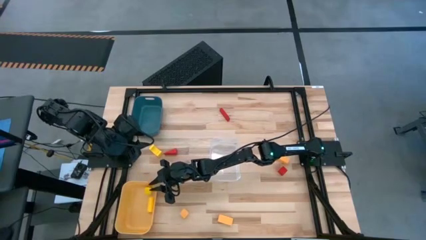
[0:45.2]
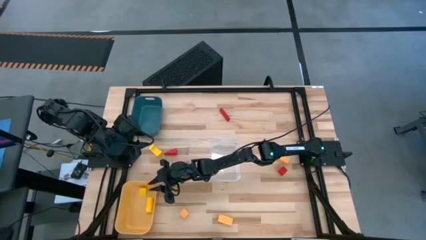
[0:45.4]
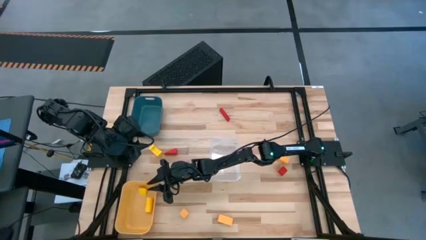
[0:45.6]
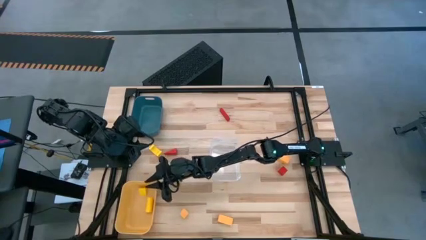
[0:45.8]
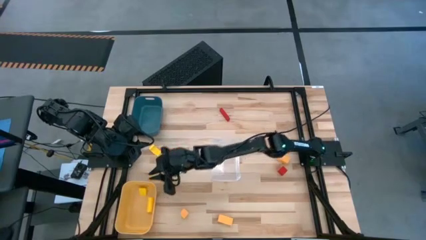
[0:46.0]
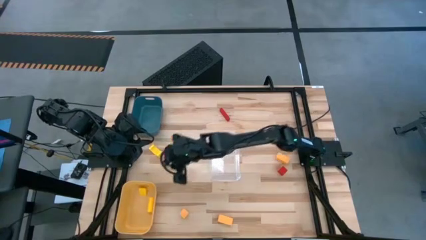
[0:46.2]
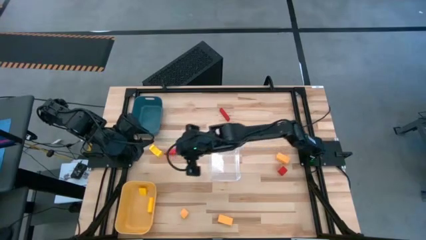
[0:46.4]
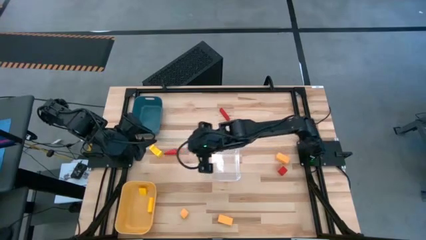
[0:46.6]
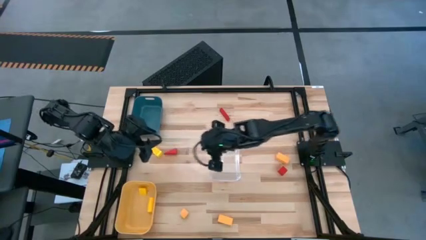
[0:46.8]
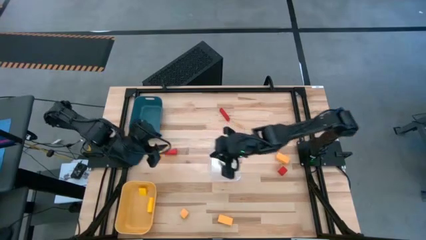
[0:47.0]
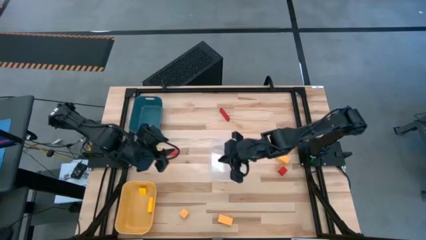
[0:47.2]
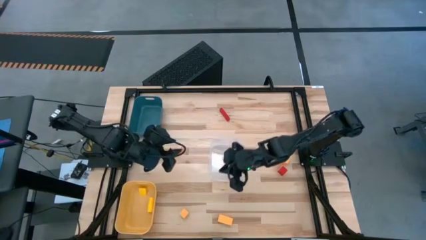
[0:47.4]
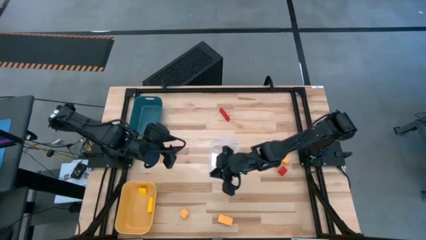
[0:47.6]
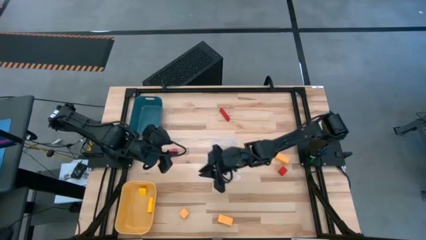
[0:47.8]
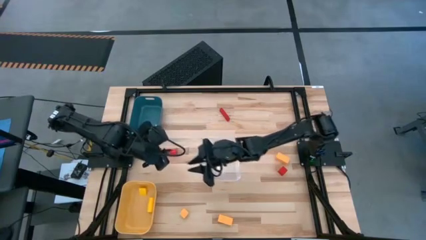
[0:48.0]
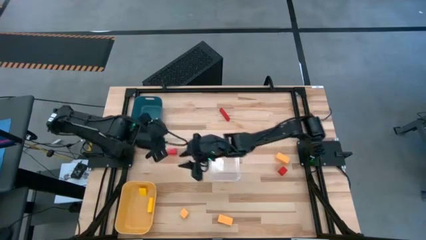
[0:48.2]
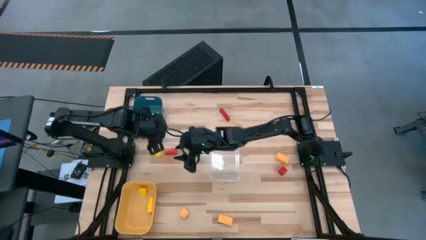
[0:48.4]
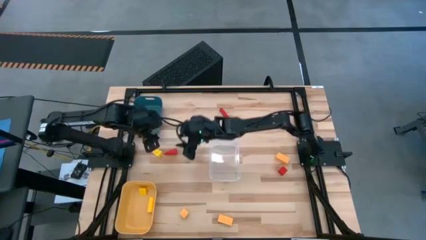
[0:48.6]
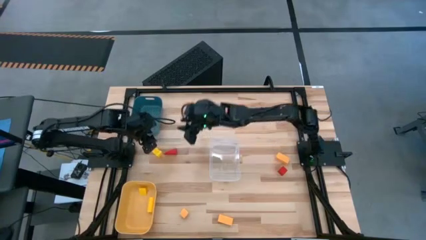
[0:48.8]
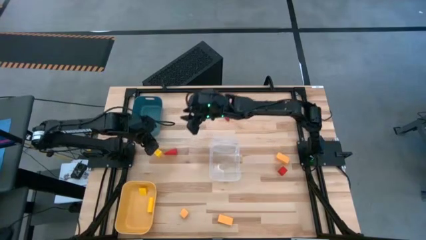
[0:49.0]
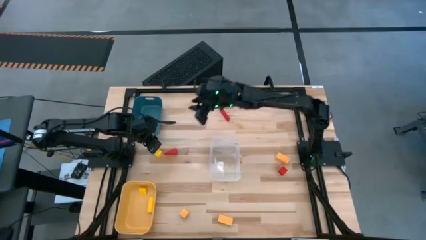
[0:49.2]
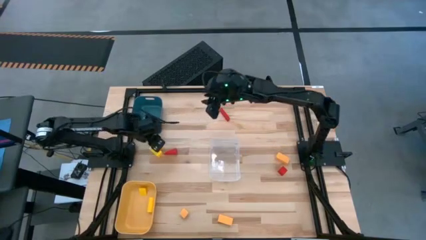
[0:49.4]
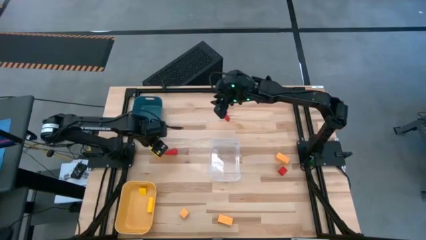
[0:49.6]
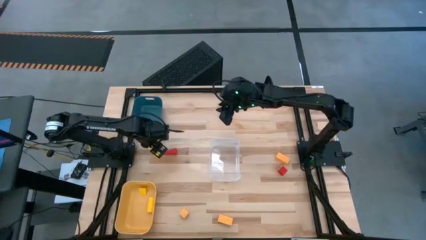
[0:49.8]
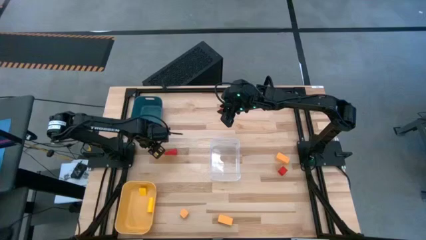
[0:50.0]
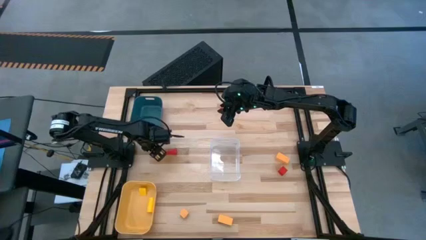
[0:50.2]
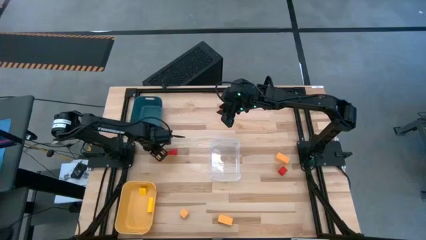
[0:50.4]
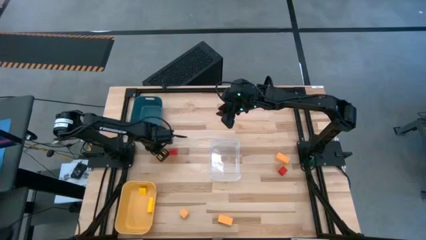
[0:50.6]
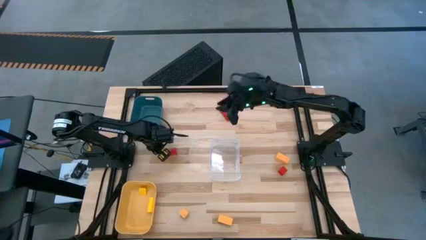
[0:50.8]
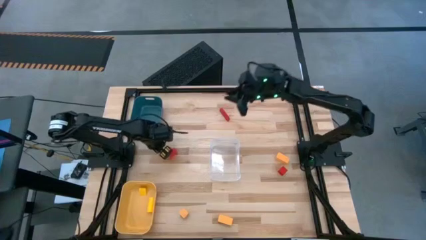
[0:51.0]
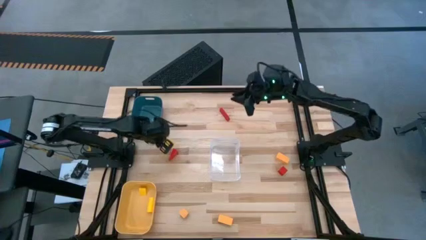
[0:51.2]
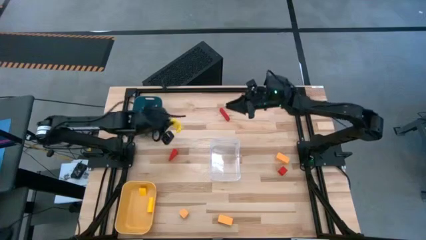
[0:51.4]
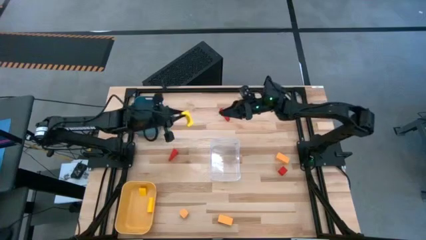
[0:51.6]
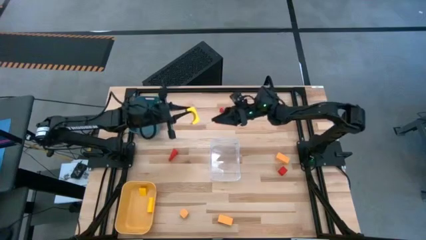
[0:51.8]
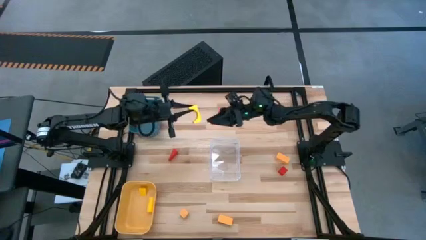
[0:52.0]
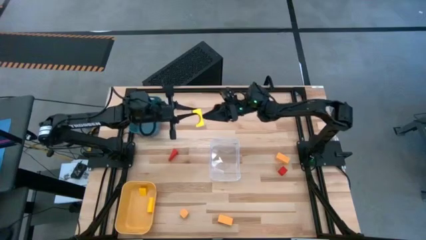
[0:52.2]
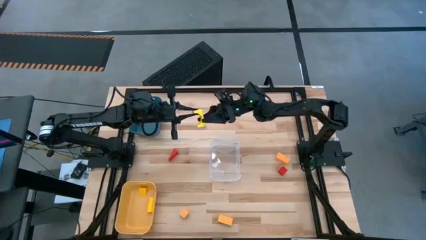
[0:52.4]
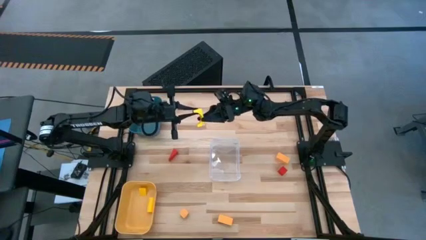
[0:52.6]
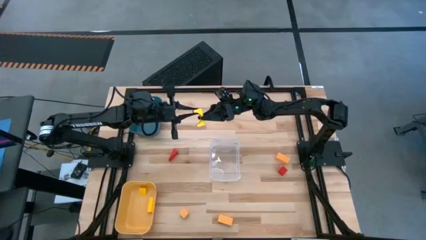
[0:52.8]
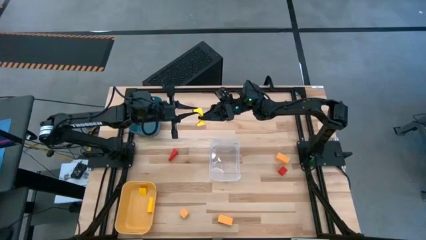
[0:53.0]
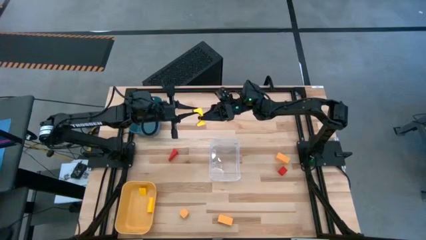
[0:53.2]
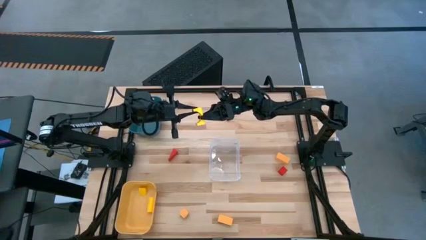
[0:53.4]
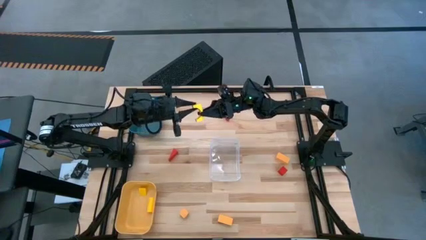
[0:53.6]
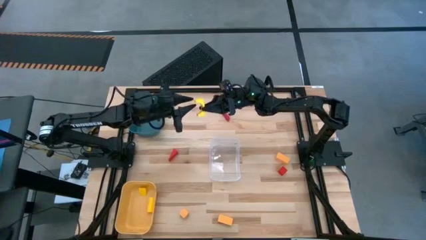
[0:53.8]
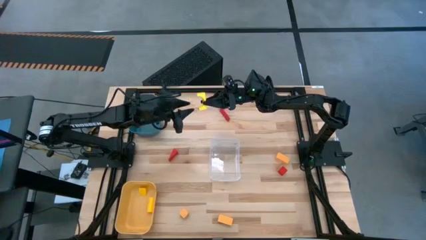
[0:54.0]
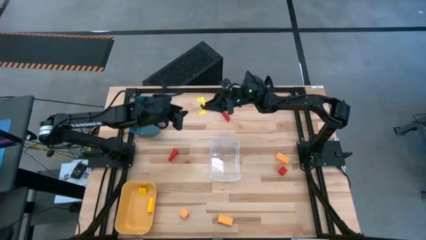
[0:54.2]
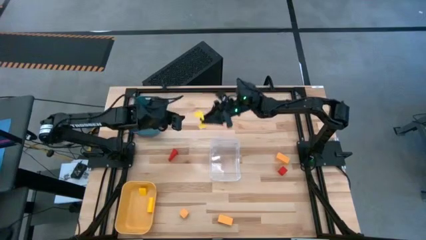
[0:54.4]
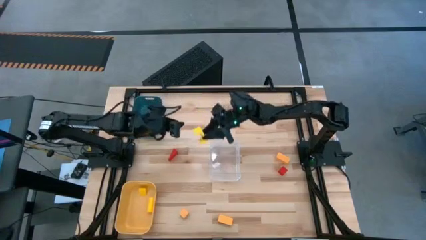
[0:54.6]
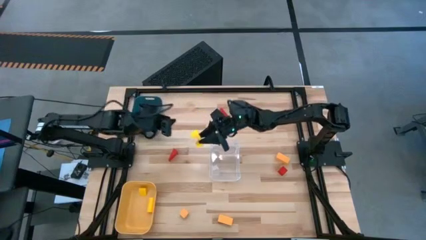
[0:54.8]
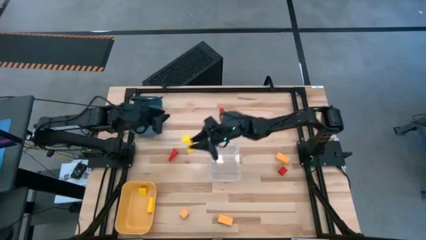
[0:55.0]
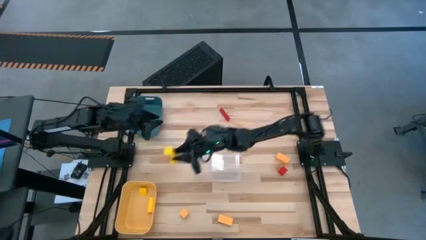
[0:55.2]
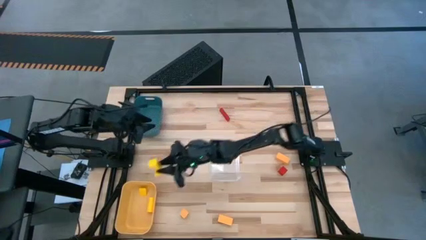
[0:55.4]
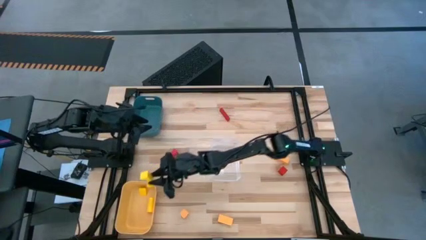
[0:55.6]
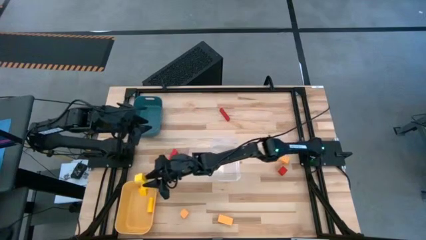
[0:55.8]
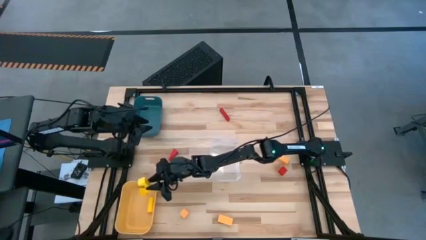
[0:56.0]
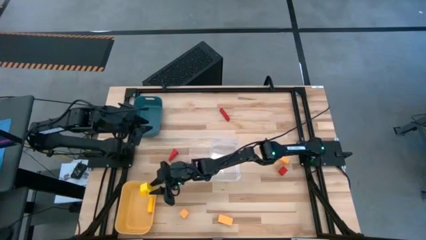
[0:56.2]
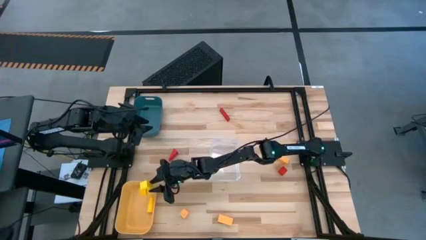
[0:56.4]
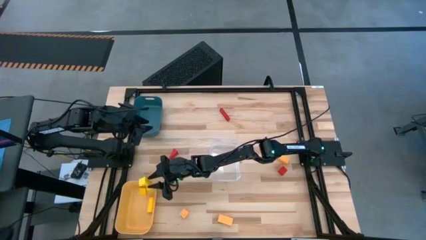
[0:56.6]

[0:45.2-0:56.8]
Task: Sort & place blocks by color
Put the yellow block into the yellow bin

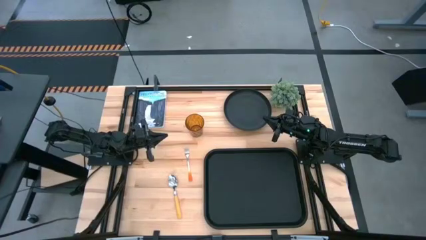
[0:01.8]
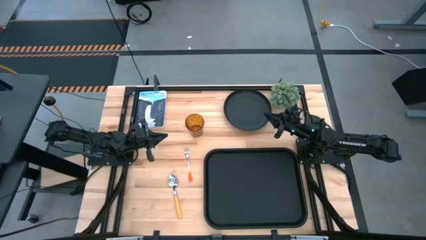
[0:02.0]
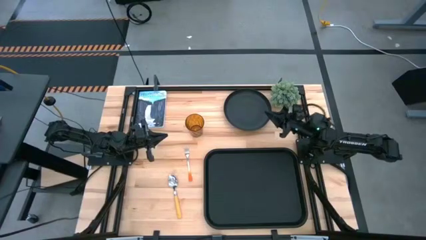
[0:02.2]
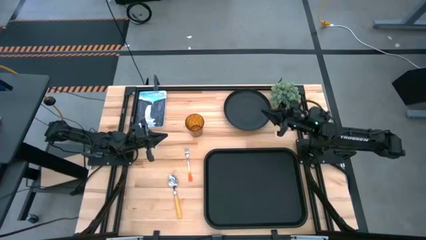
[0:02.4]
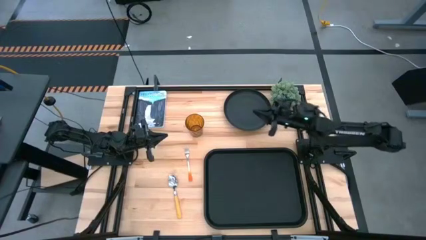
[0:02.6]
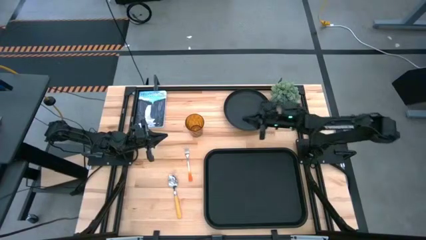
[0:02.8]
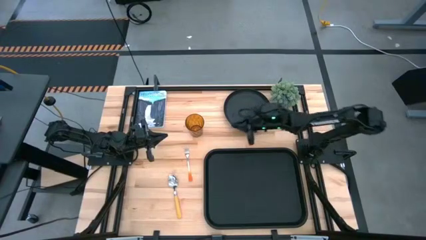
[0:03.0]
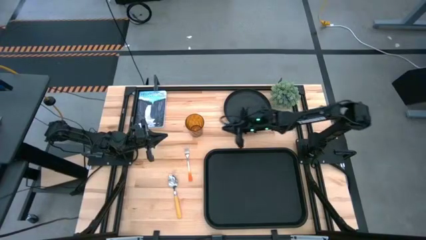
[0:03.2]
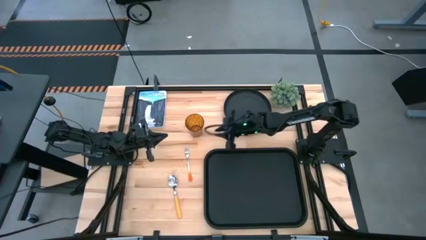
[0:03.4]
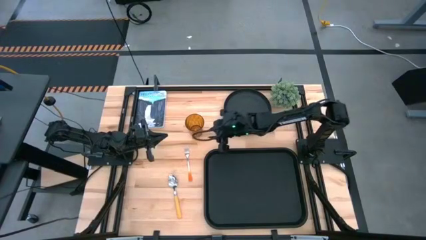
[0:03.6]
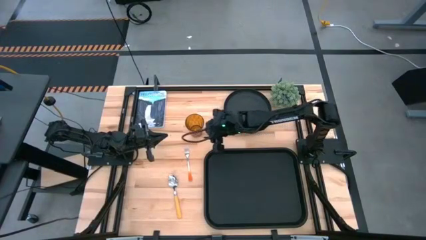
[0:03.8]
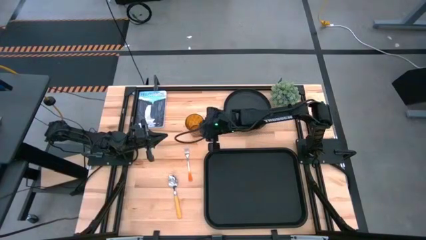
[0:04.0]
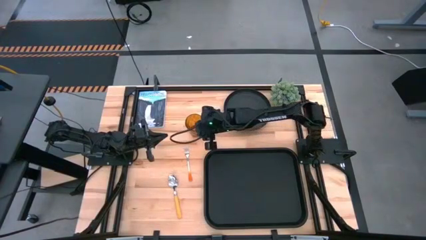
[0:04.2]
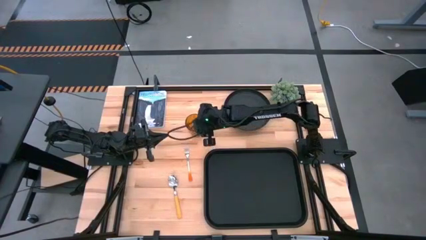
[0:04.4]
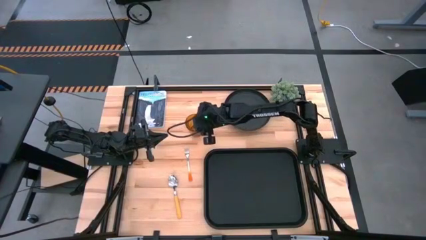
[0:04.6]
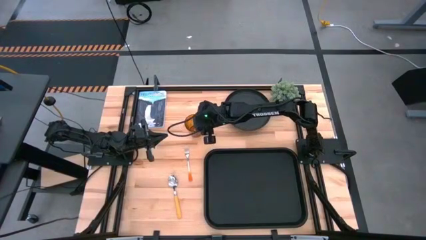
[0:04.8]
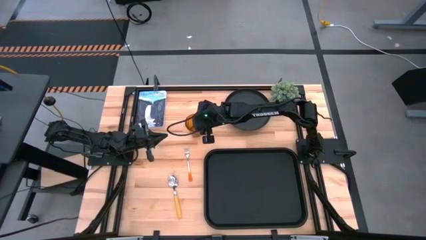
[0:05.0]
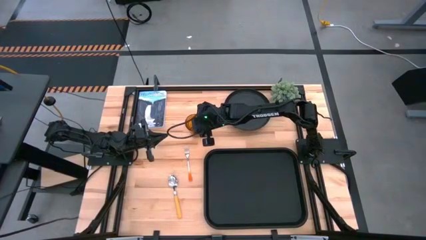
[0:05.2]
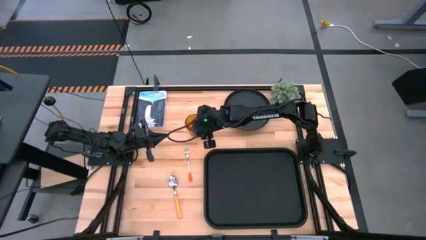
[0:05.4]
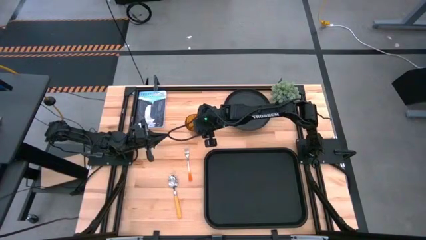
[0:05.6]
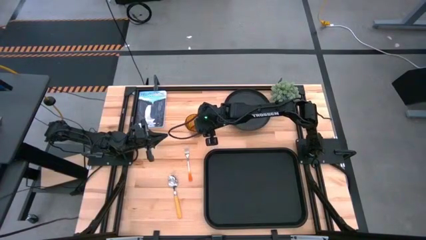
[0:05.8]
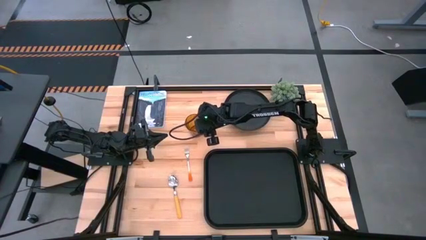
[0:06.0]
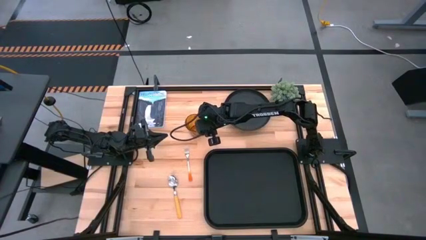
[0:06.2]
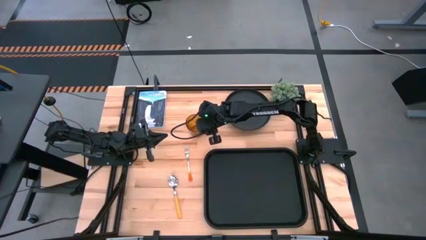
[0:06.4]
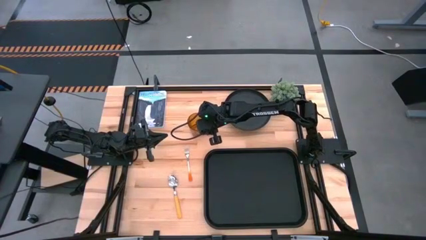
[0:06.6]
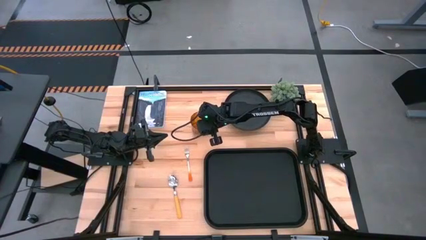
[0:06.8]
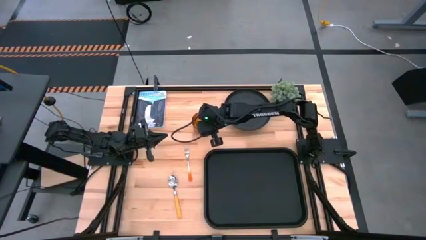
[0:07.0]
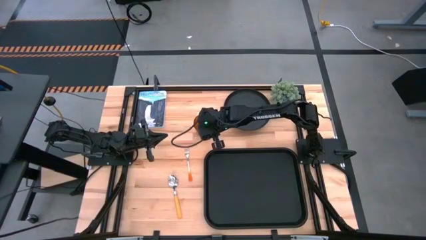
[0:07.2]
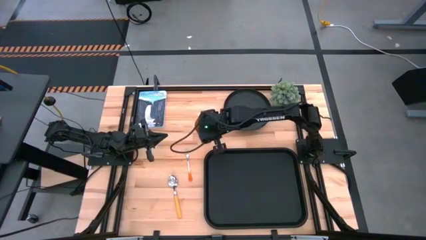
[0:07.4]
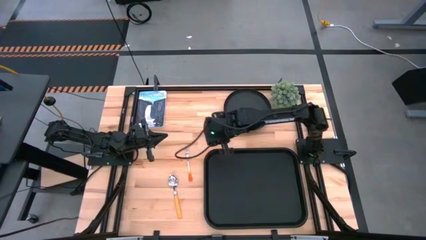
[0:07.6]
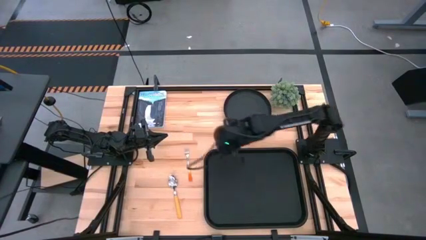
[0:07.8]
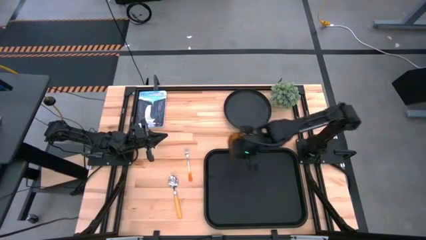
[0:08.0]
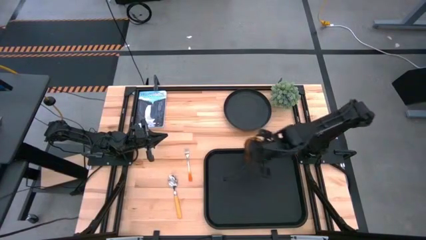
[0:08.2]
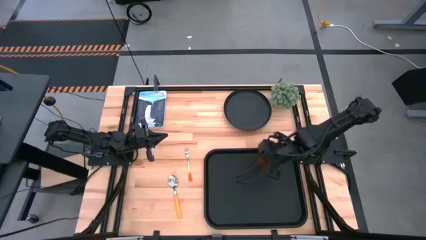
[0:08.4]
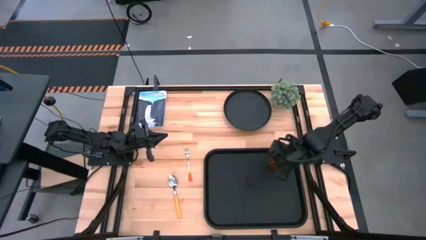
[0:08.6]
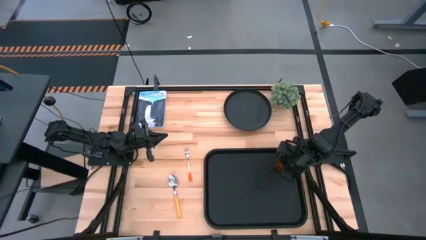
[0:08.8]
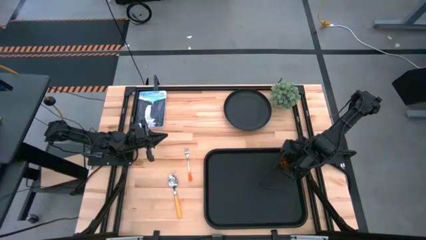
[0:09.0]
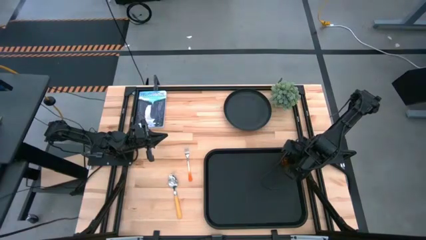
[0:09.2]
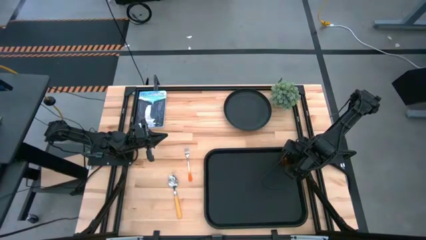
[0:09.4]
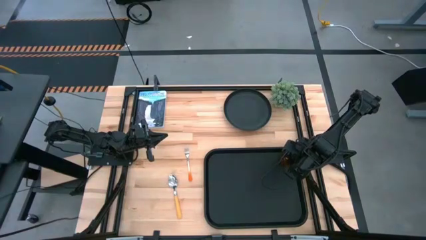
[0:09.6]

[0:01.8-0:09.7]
Task: Pick and place plate/cup/fork/spoon on tray
Put the yellow cup on the black tray
